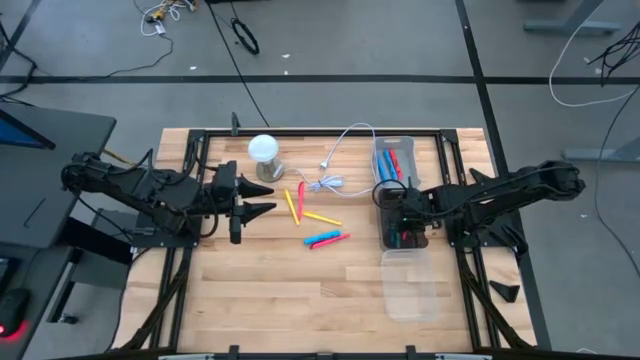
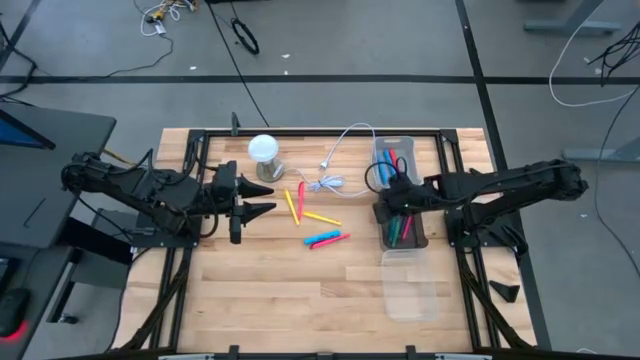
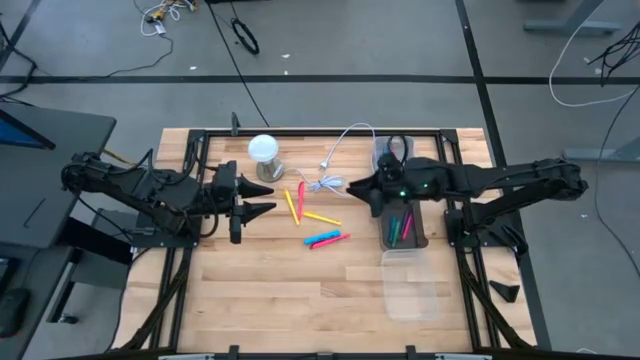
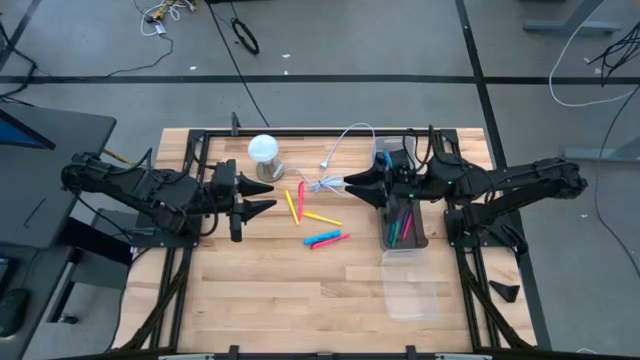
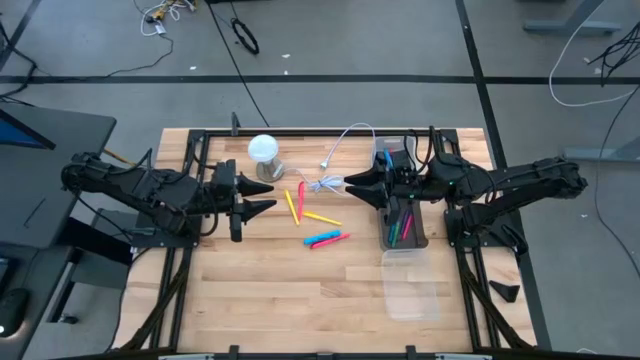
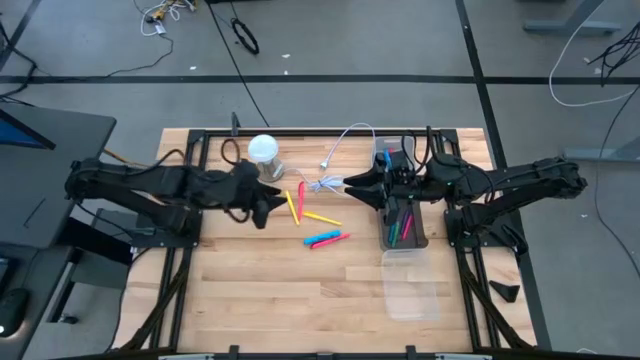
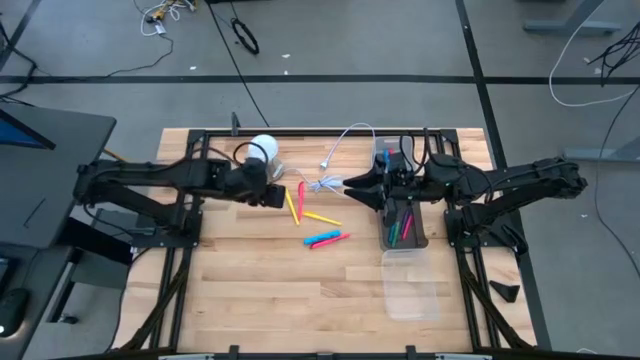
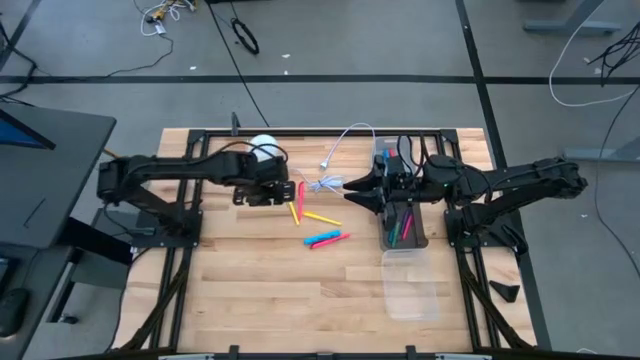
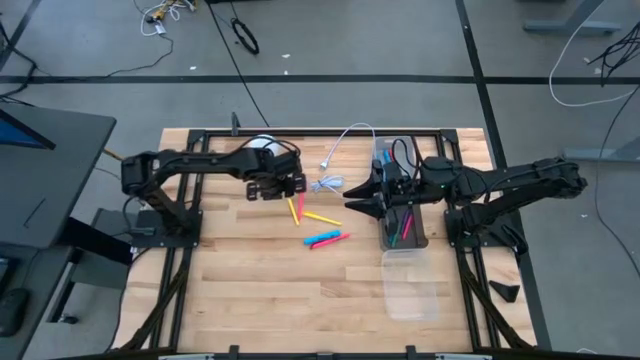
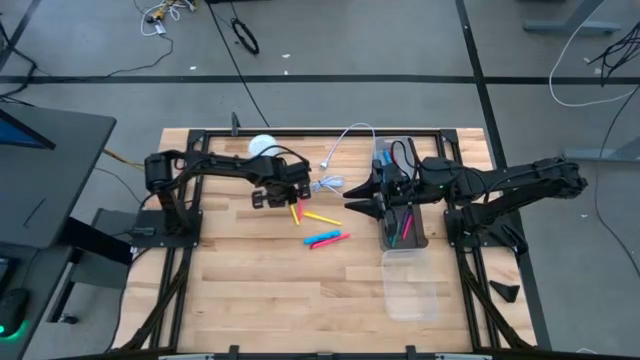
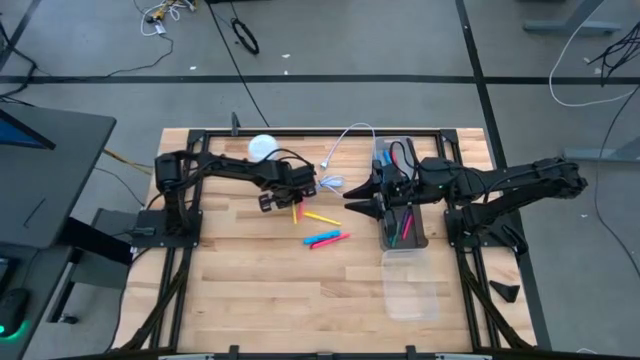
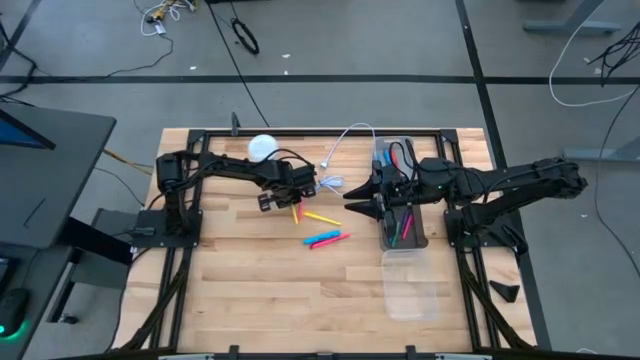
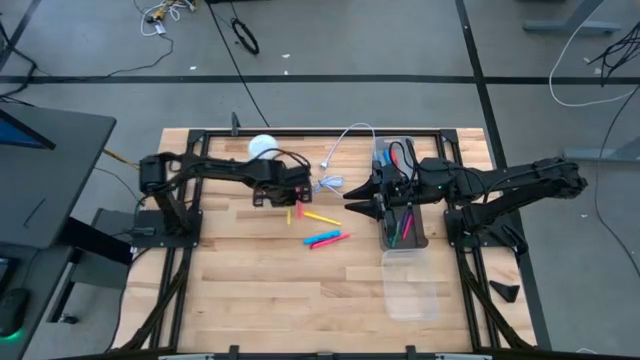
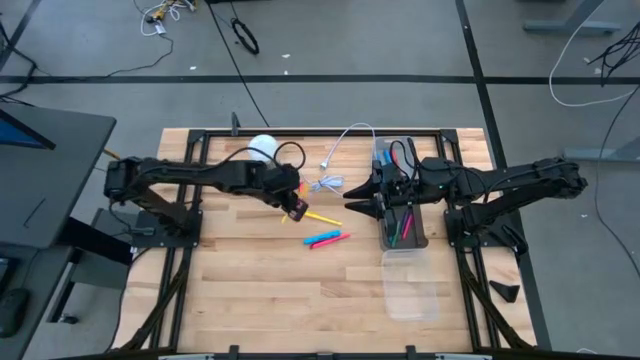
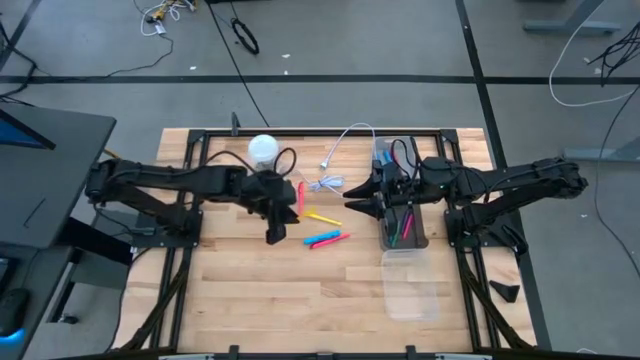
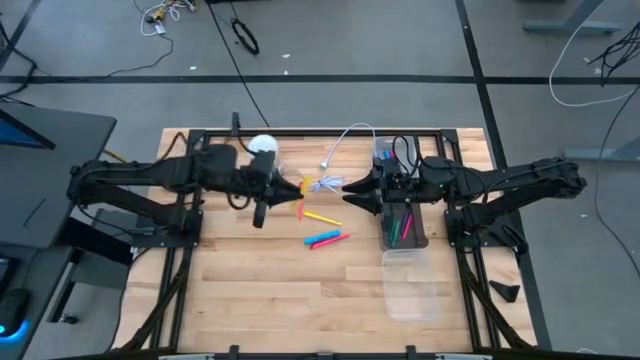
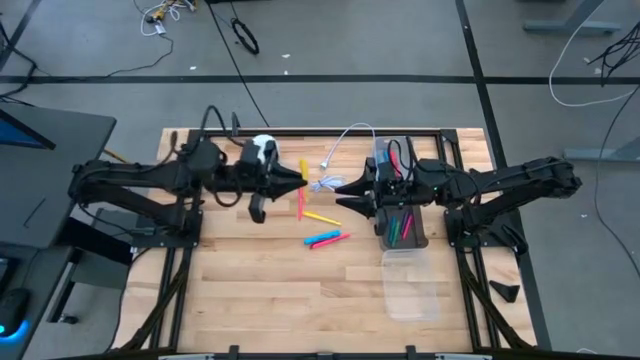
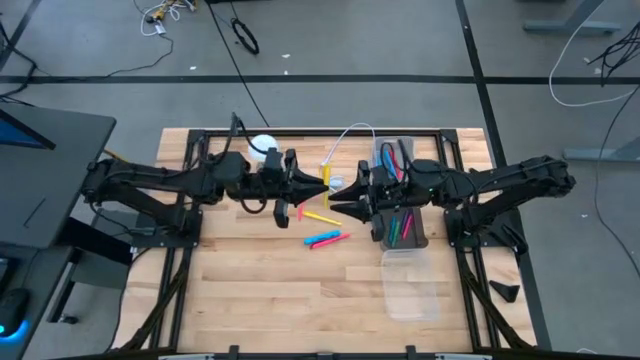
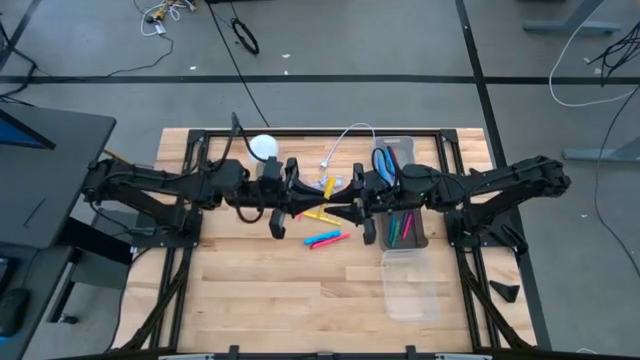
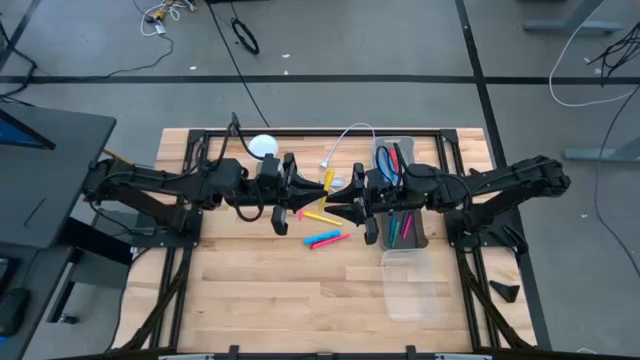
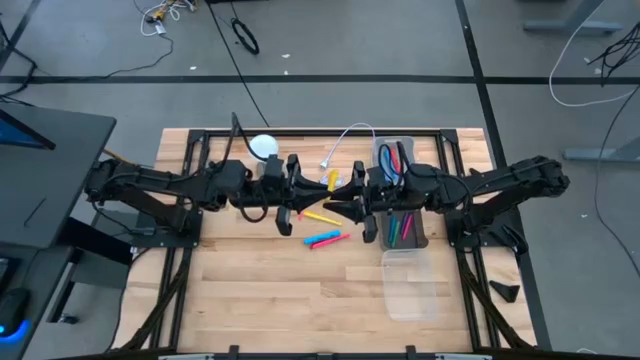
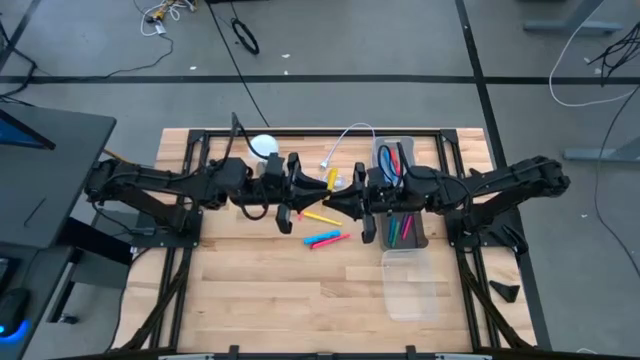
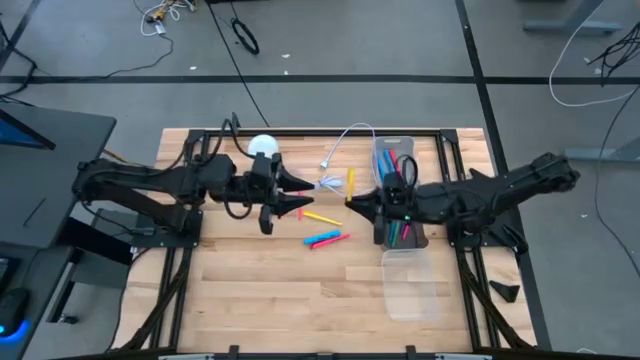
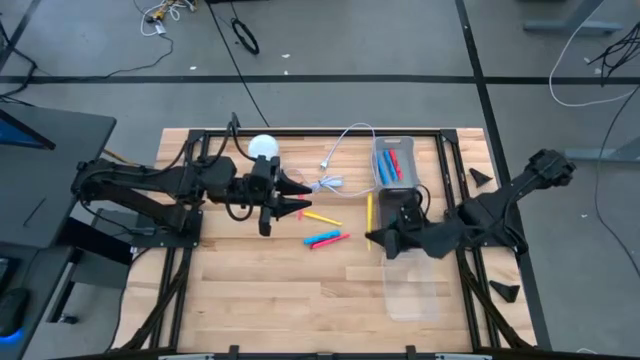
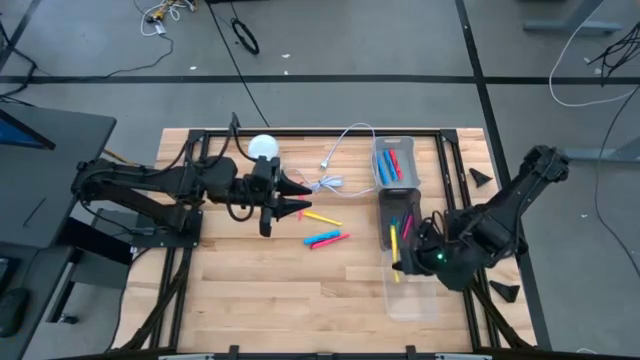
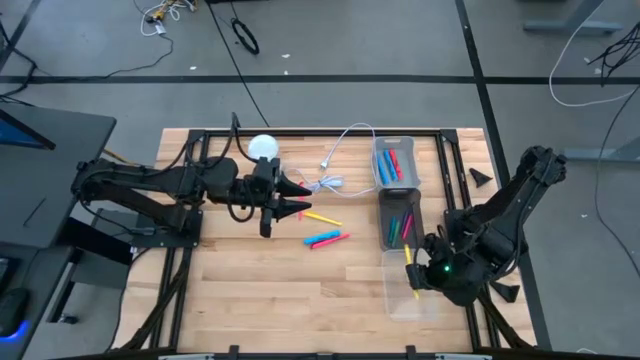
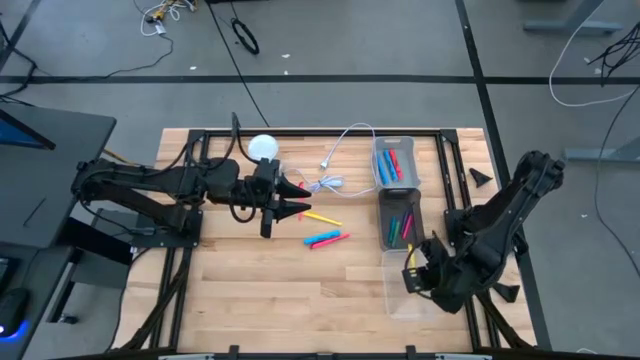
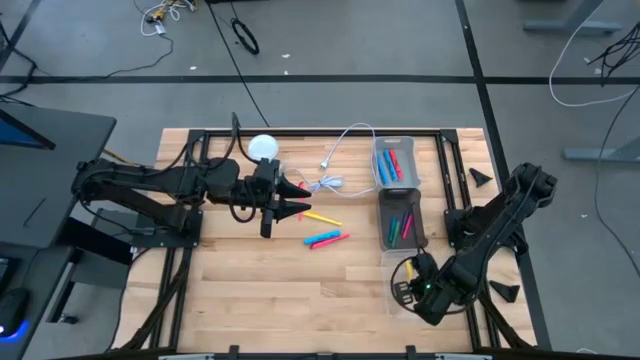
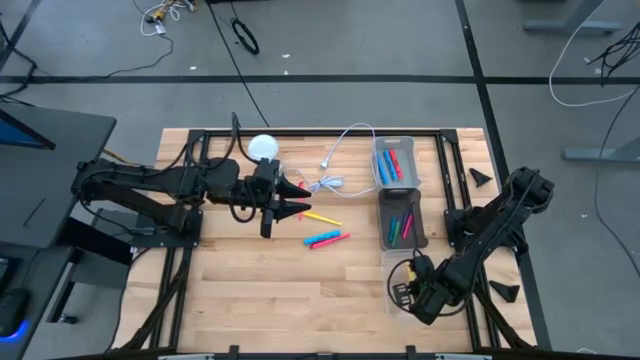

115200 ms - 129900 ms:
Task: Pick & Place Markers
Put the left yellow pen into the transparent bin

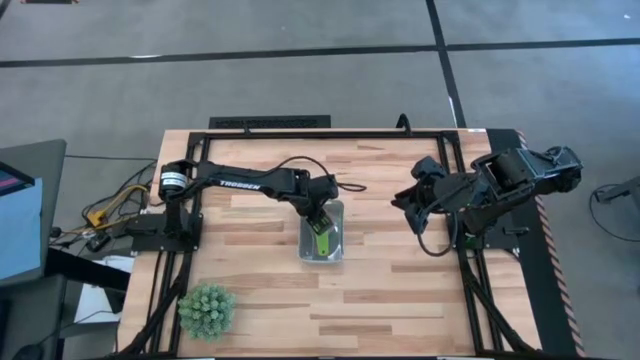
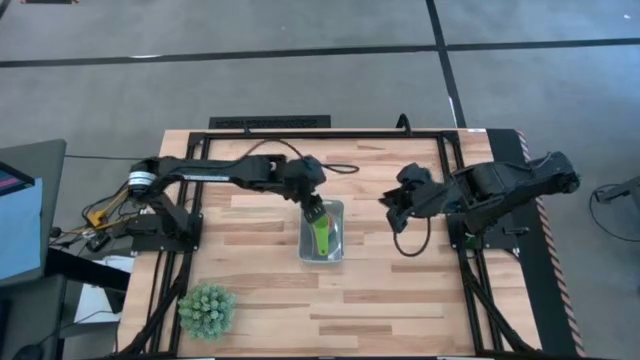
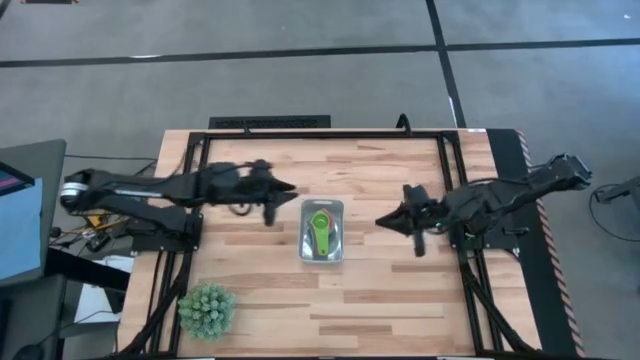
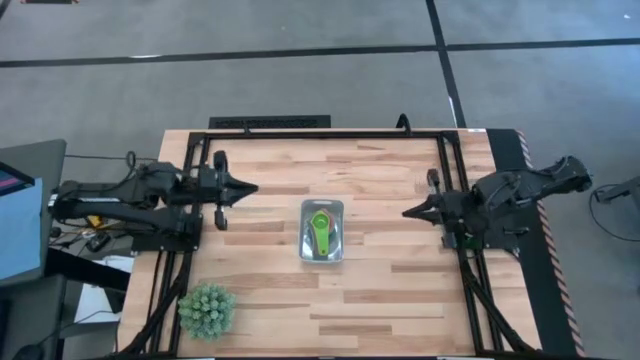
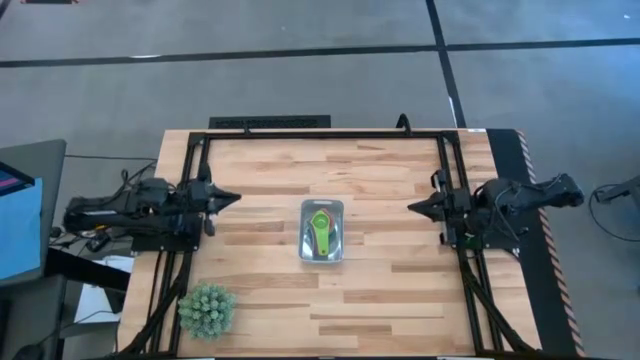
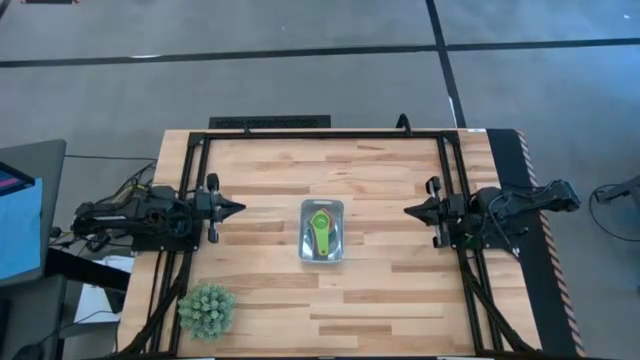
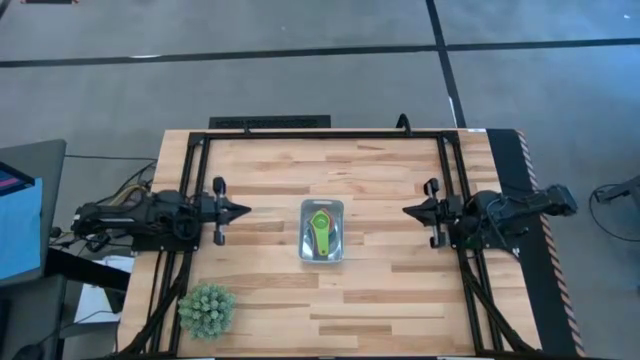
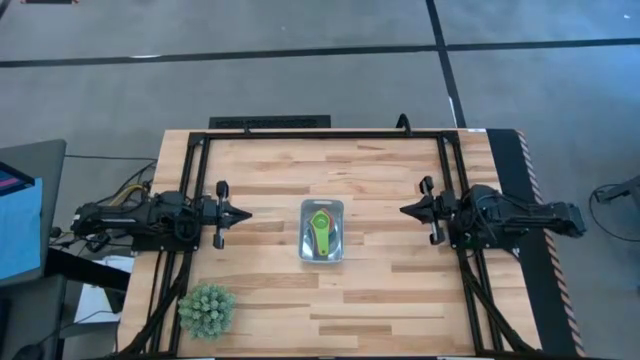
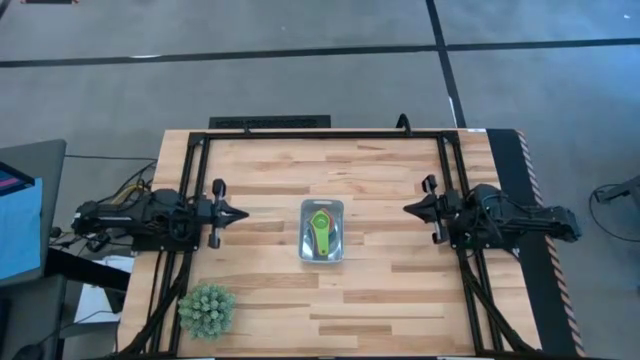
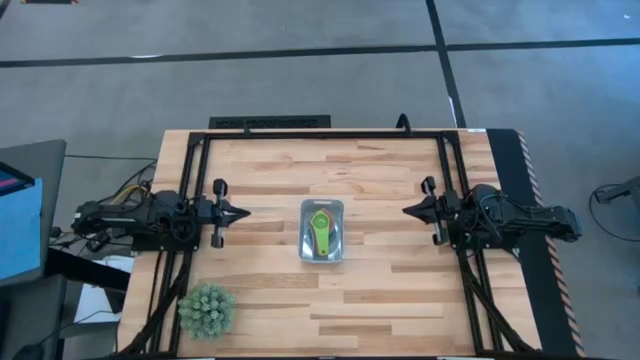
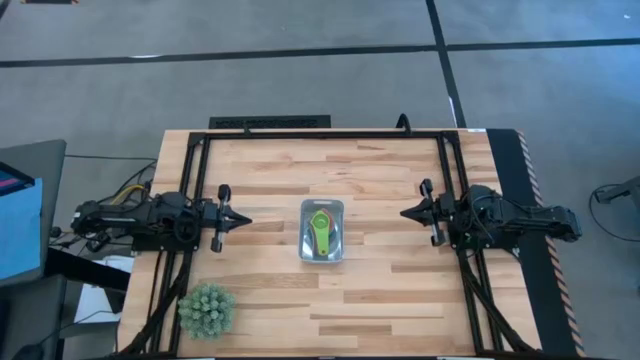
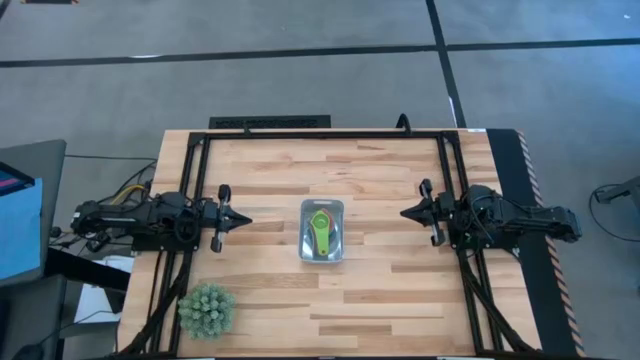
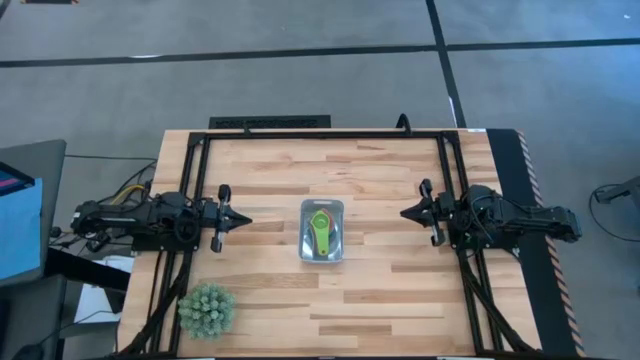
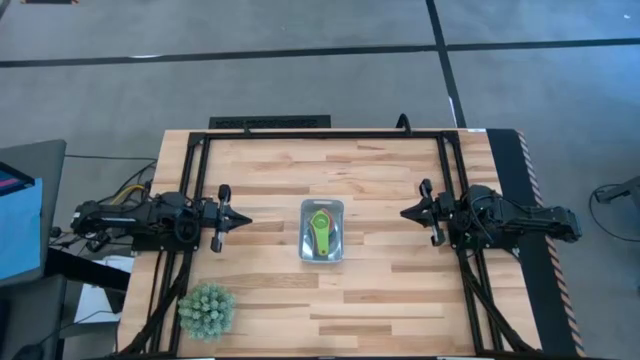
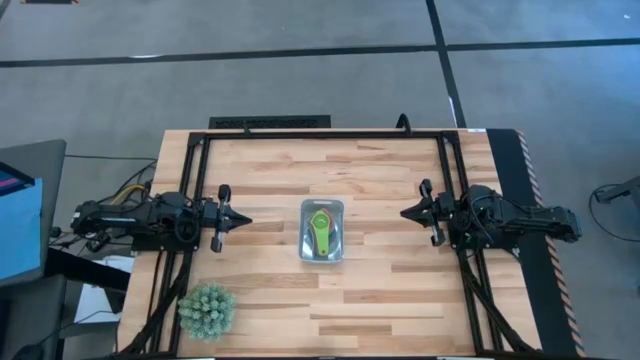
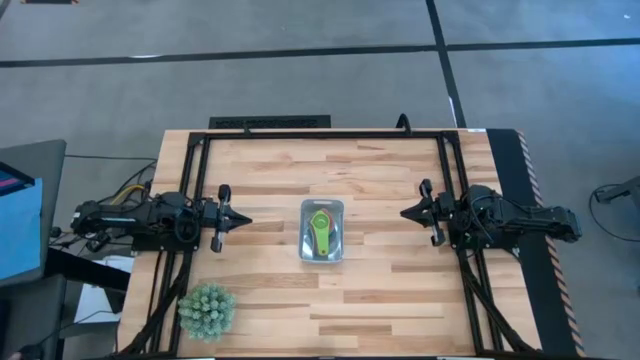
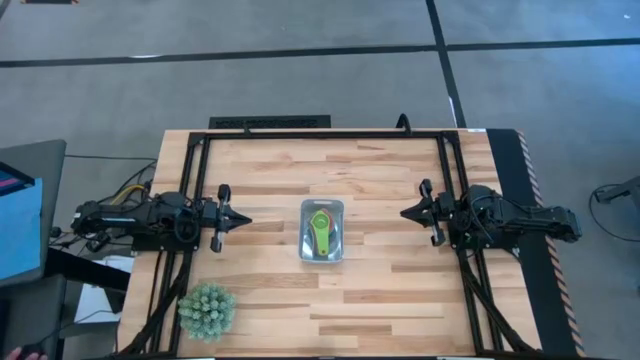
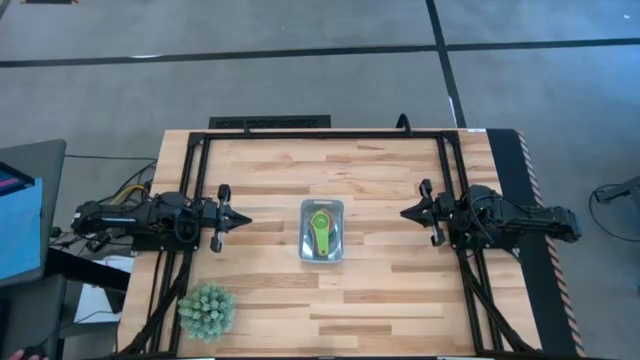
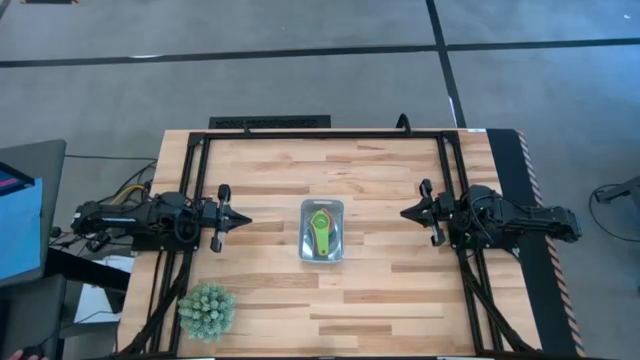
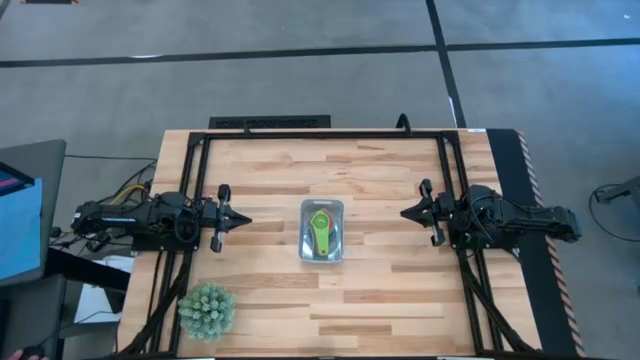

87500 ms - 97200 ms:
Task: Nest measuring cups in basket
Return to Home Position
